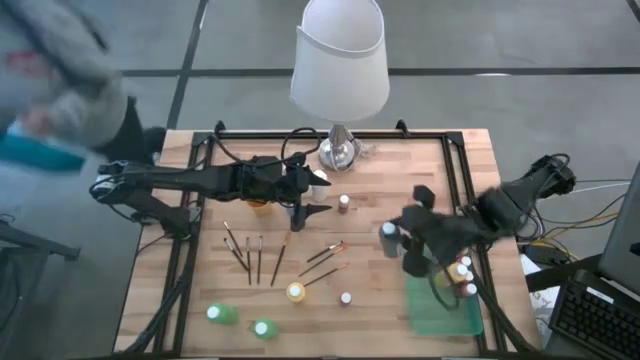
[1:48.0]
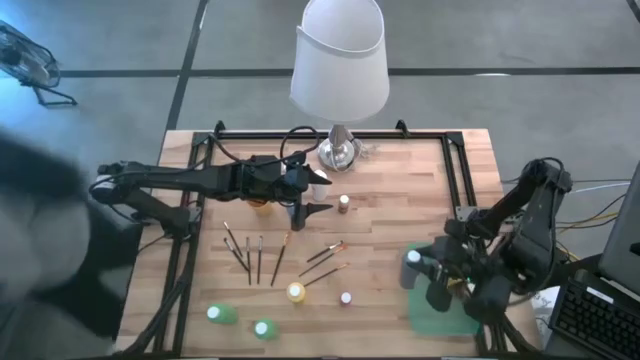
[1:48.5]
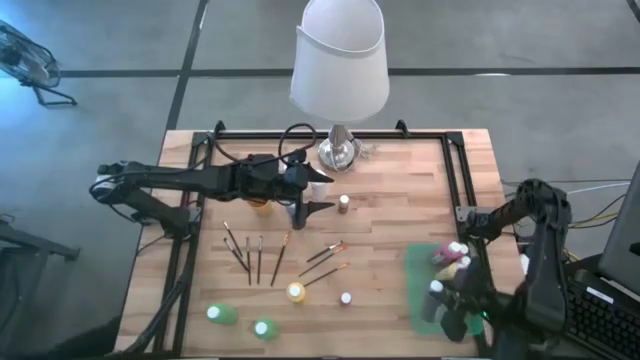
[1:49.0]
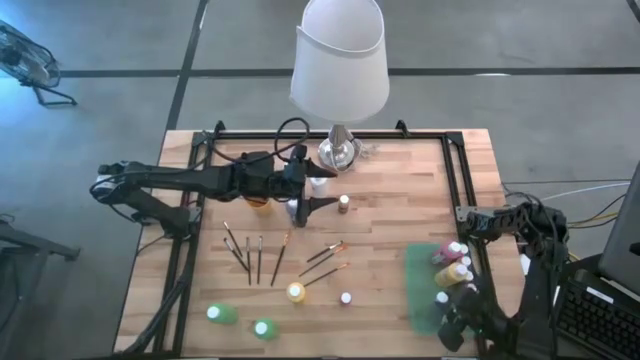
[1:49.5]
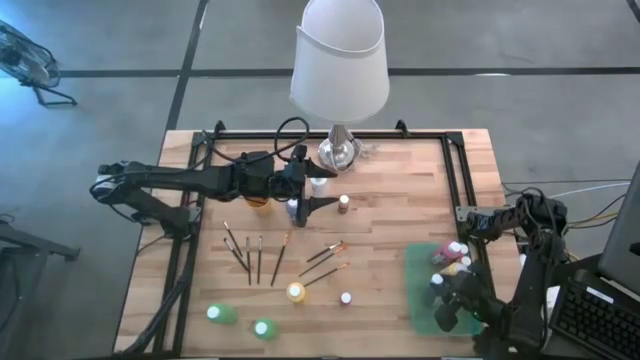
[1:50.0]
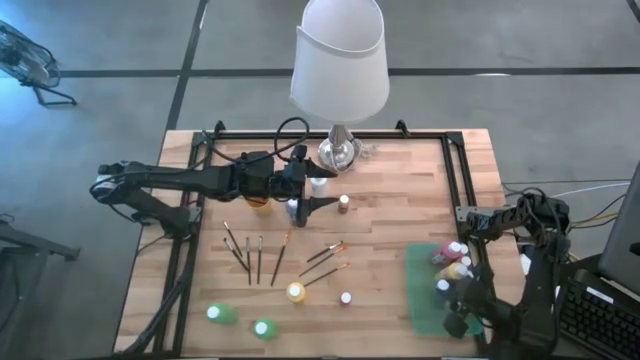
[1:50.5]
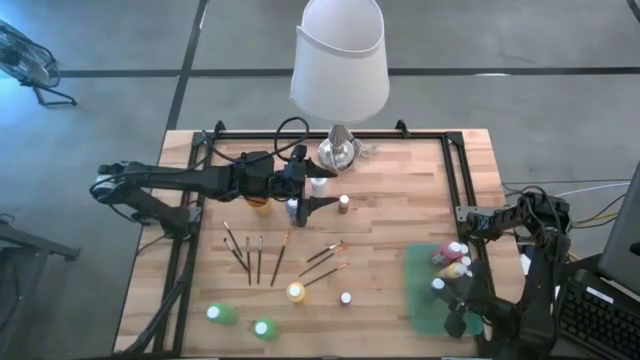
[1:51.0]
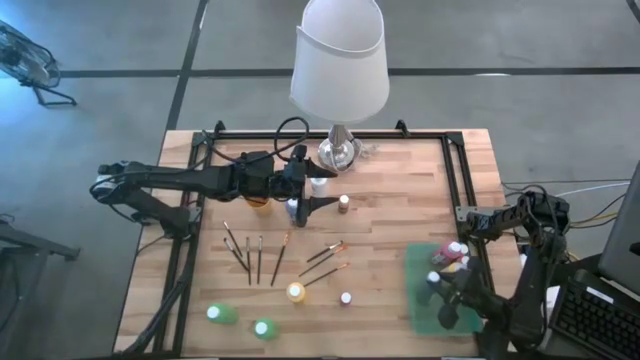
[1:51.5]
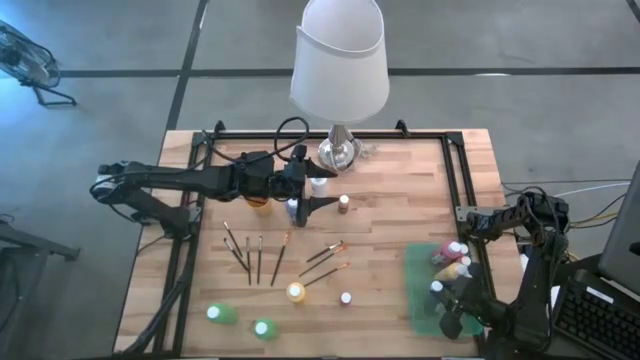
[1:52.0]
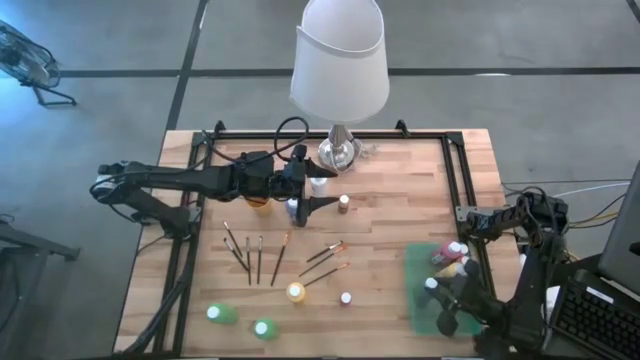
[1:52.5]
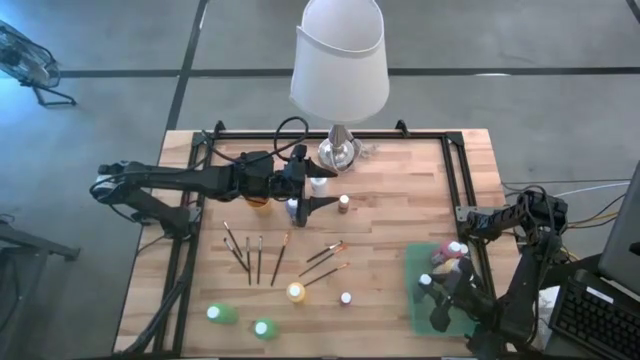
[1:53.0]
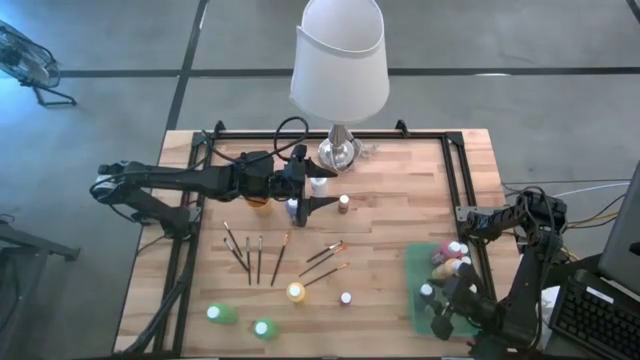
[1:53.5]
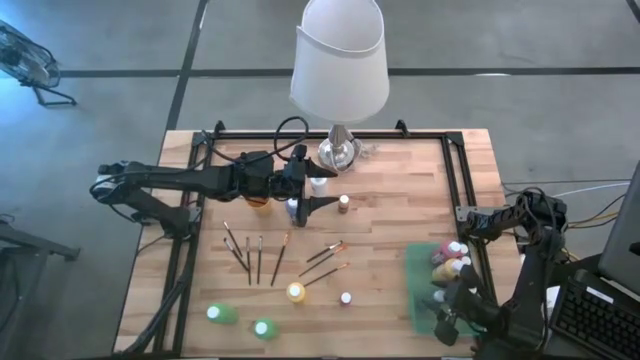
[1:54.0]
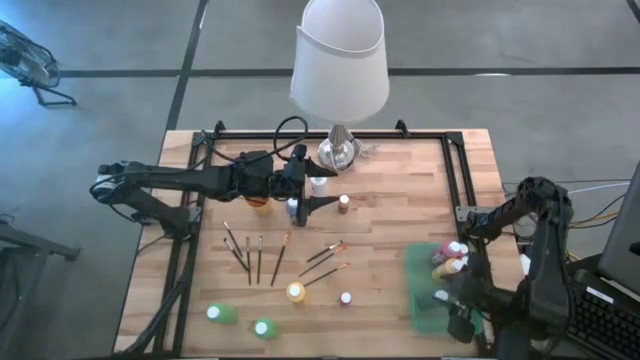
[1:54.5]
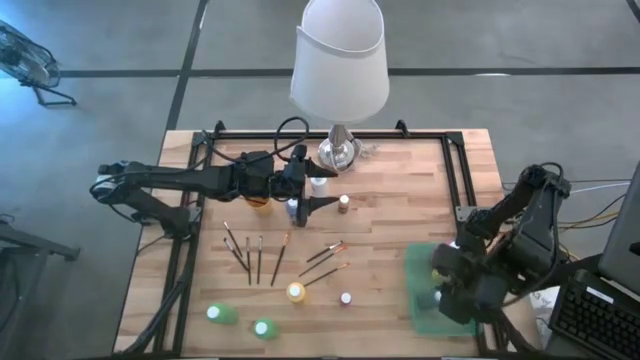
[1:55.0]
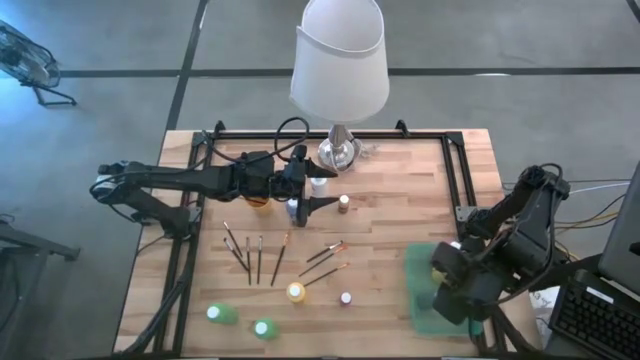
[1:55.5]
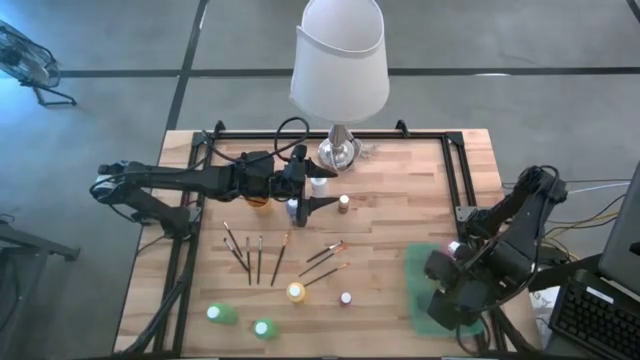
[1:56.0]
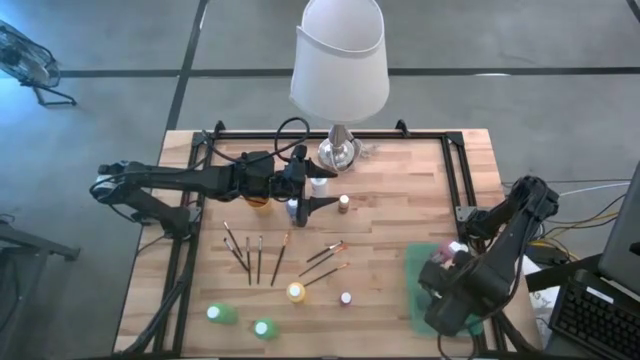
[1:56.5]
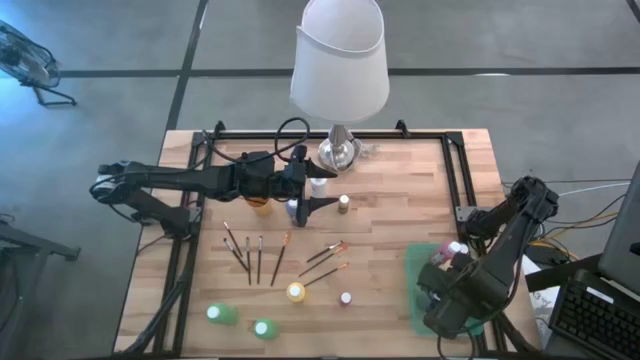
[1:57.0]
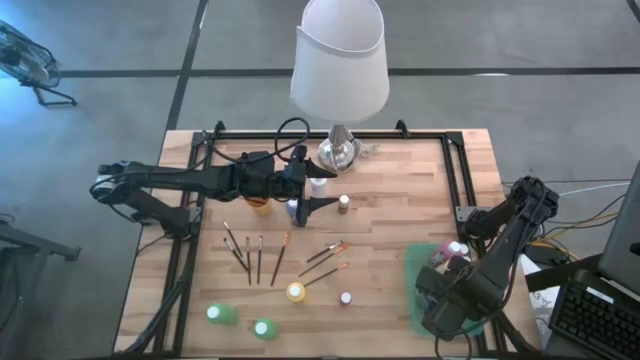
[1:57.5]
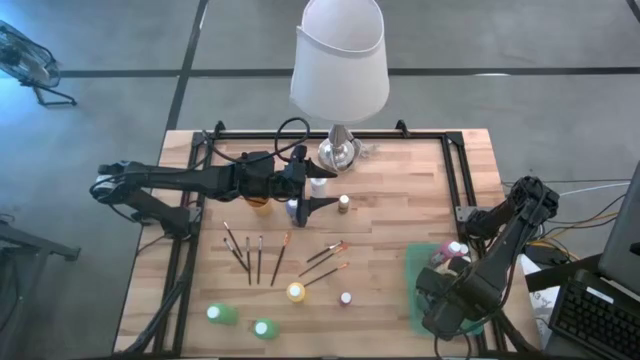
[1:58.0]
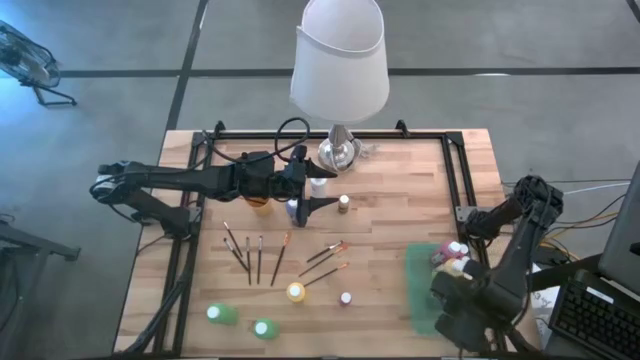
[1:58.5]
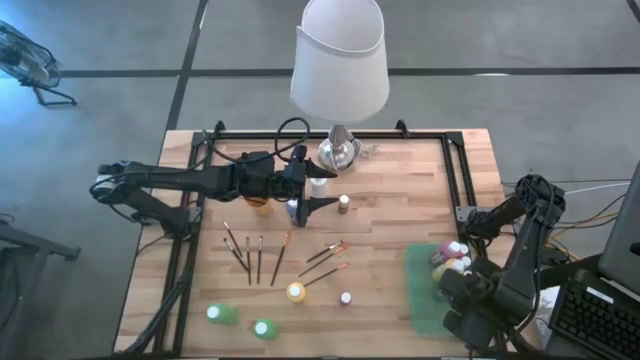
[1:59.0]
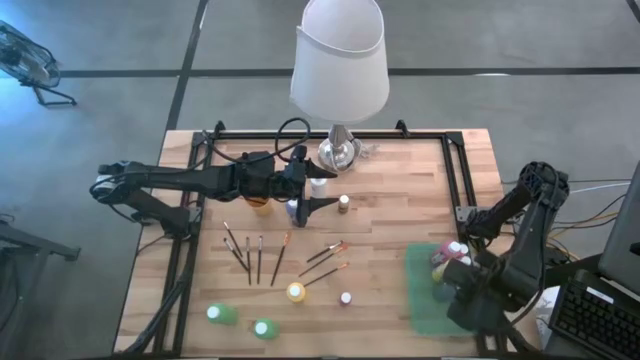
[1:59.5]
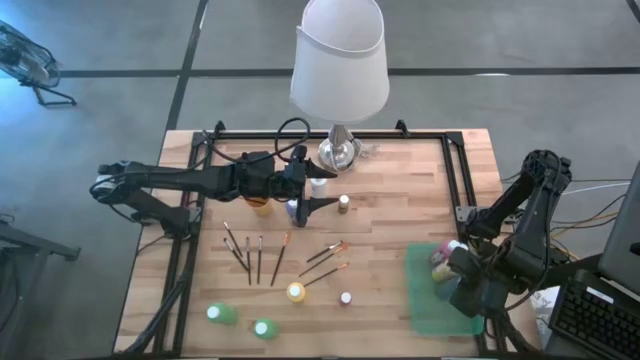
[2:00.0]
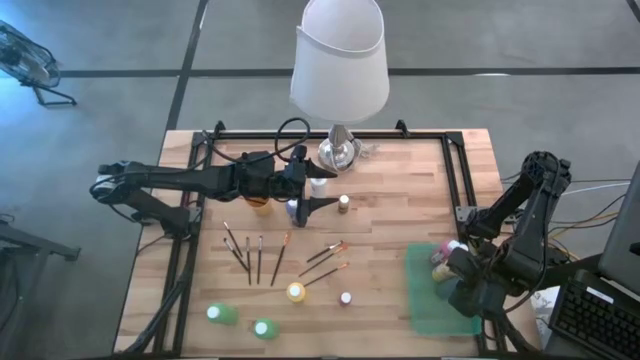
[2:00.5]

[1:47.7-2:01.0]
Task: Pick & Place Paint Supplies
Put the blue paint bottle into the green bin
